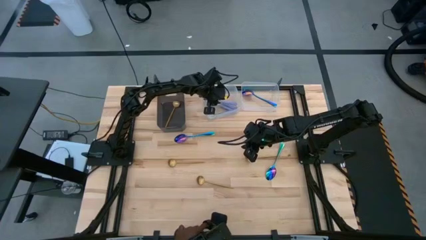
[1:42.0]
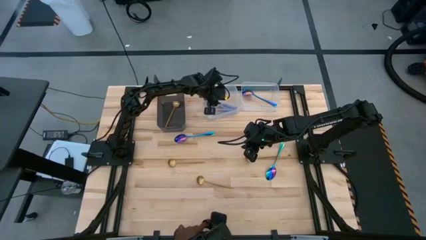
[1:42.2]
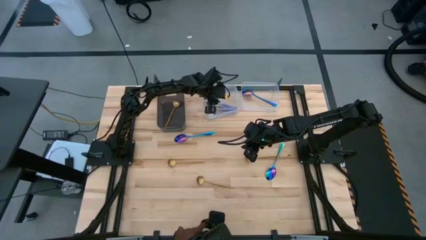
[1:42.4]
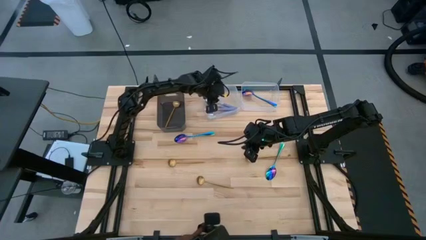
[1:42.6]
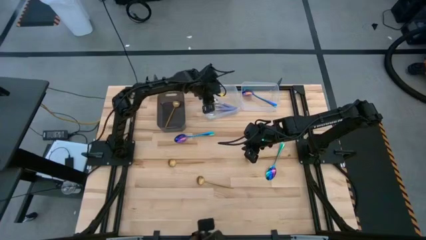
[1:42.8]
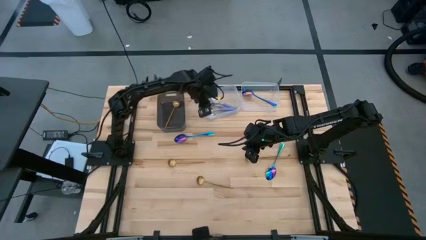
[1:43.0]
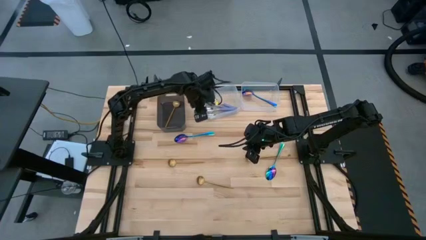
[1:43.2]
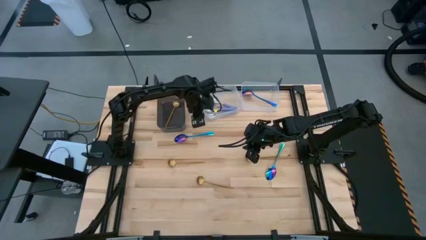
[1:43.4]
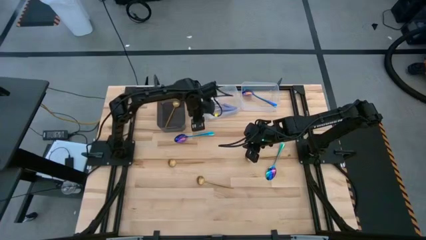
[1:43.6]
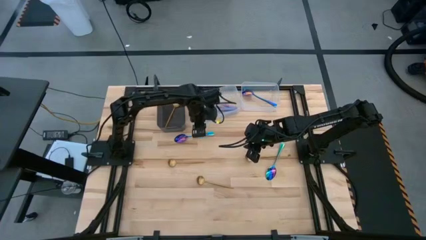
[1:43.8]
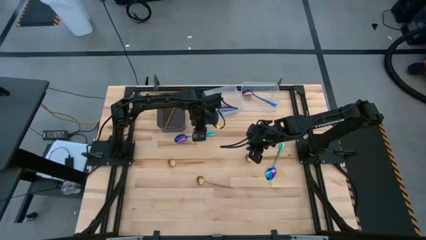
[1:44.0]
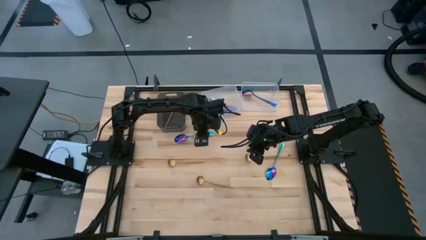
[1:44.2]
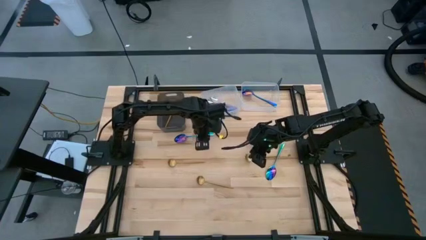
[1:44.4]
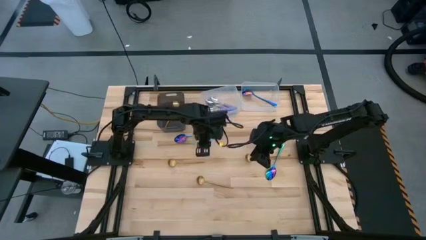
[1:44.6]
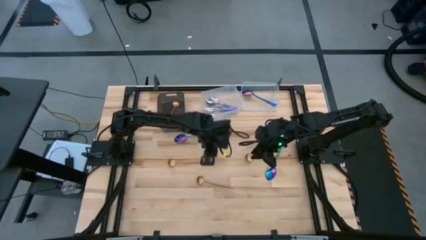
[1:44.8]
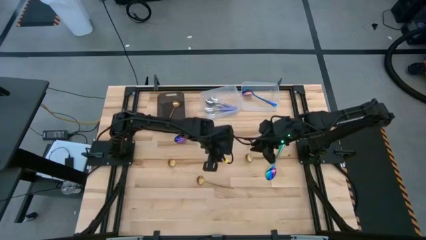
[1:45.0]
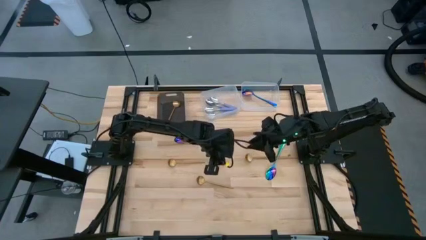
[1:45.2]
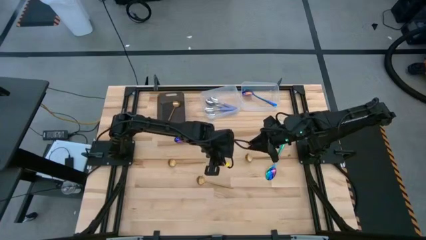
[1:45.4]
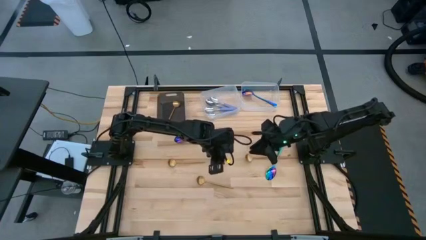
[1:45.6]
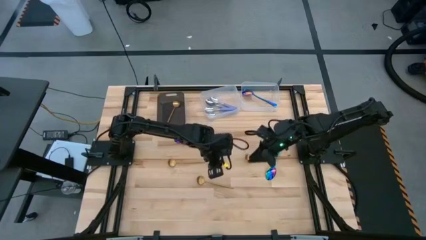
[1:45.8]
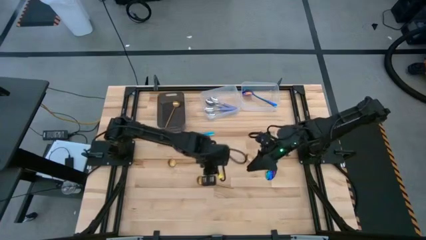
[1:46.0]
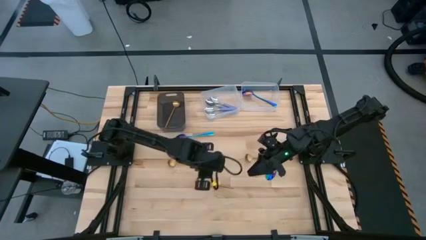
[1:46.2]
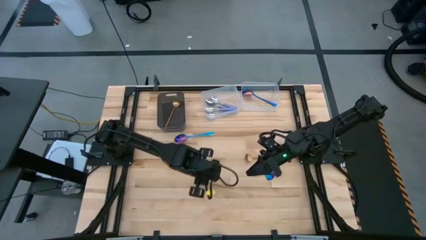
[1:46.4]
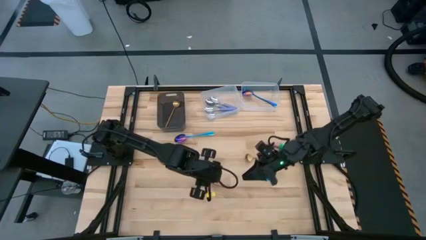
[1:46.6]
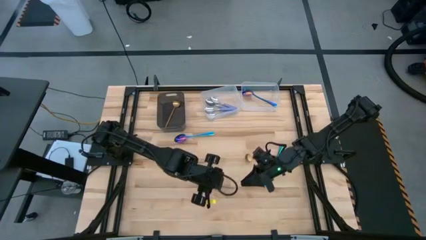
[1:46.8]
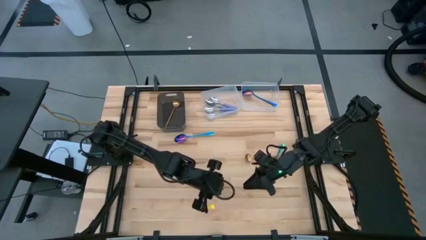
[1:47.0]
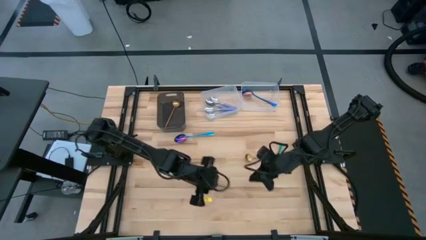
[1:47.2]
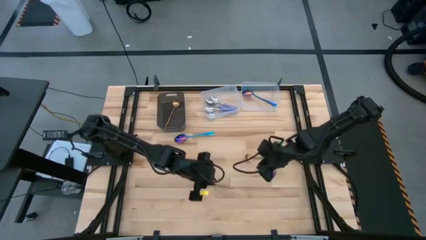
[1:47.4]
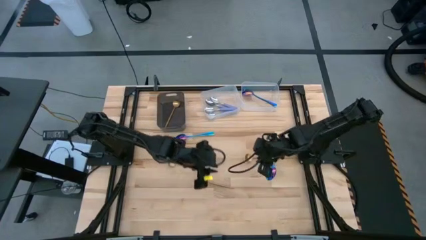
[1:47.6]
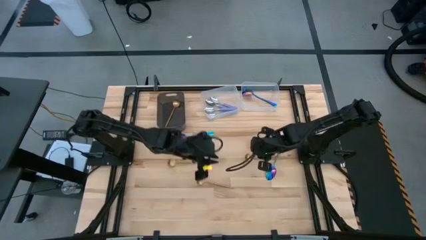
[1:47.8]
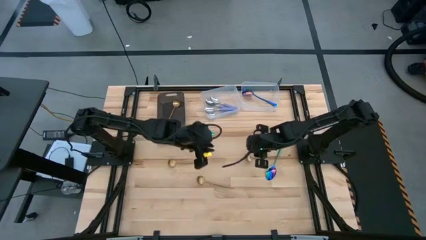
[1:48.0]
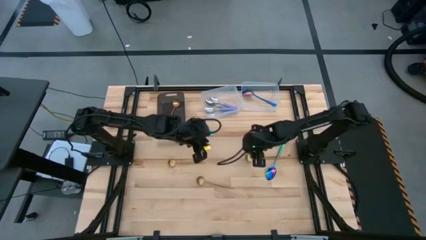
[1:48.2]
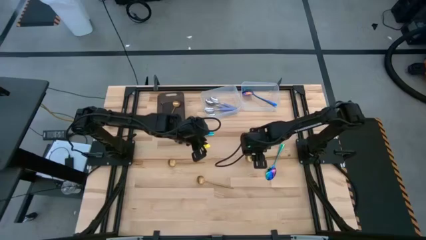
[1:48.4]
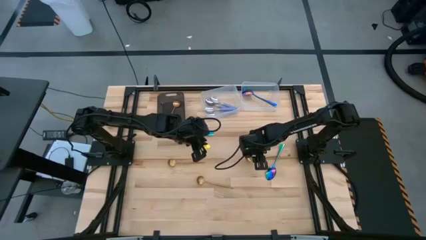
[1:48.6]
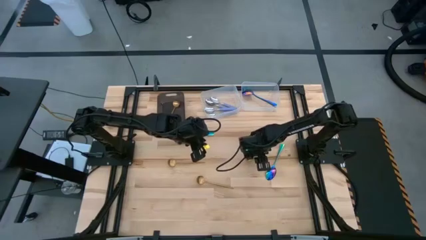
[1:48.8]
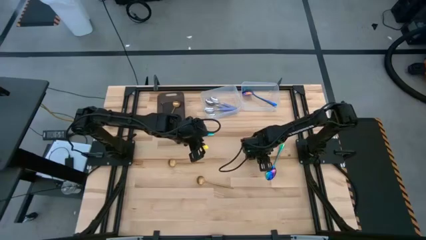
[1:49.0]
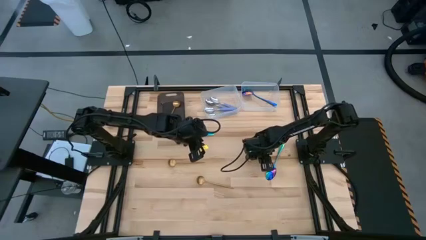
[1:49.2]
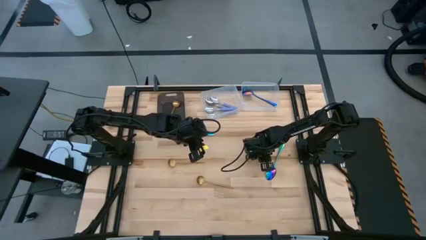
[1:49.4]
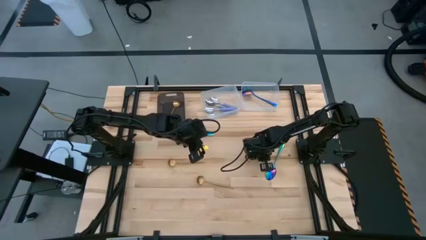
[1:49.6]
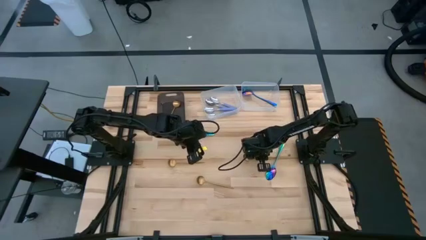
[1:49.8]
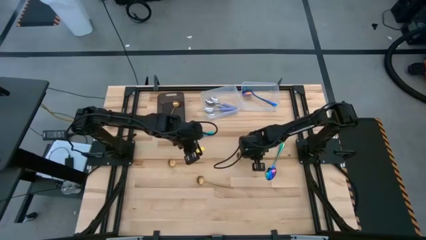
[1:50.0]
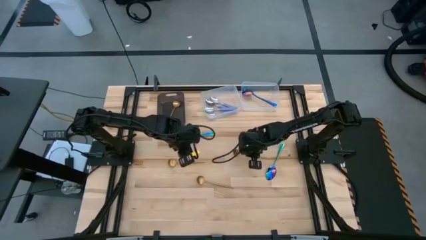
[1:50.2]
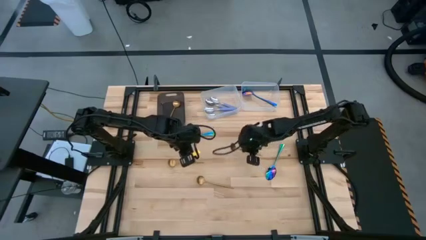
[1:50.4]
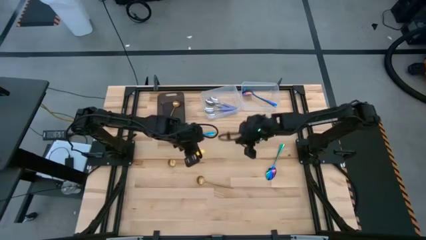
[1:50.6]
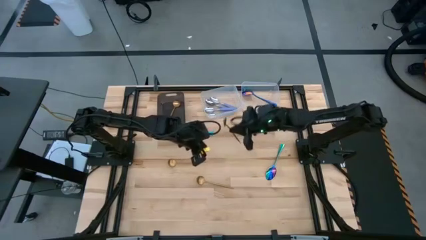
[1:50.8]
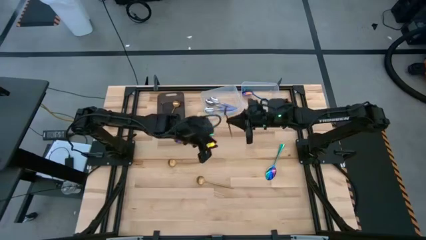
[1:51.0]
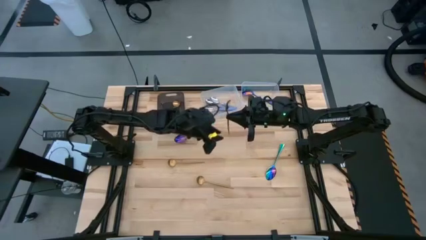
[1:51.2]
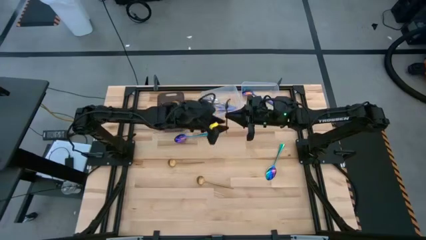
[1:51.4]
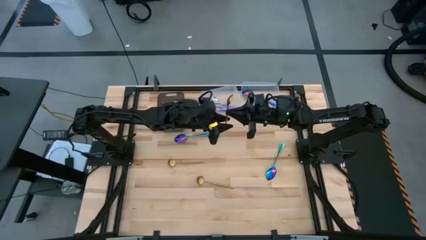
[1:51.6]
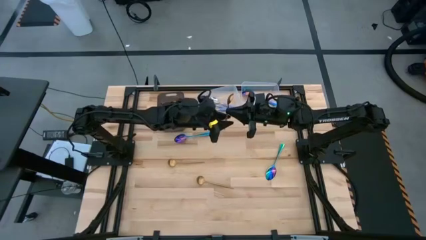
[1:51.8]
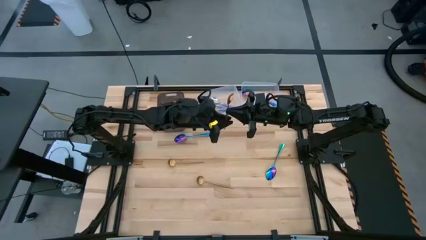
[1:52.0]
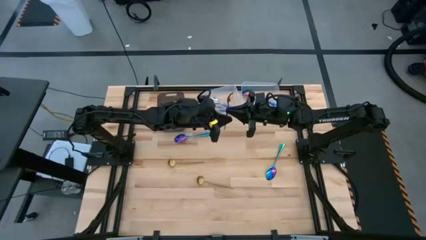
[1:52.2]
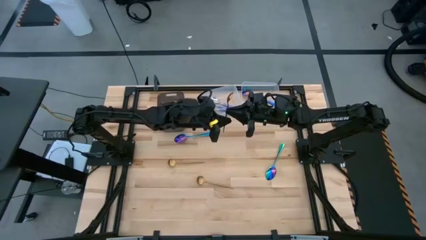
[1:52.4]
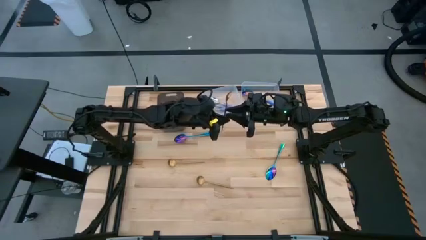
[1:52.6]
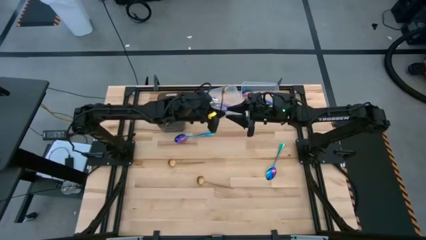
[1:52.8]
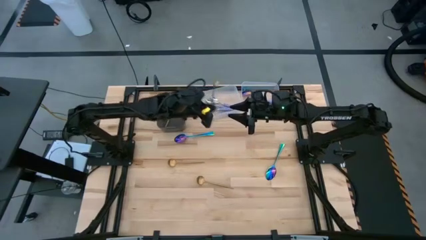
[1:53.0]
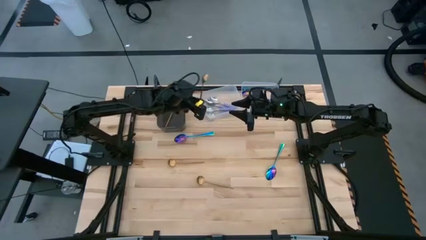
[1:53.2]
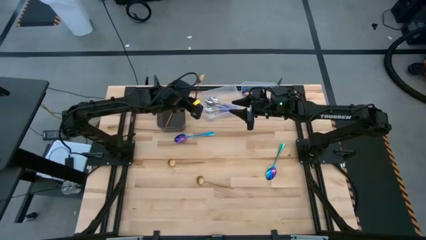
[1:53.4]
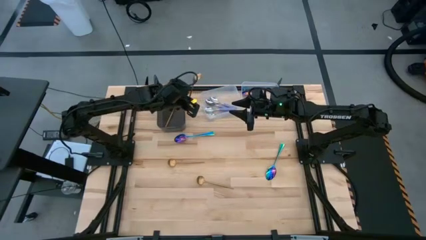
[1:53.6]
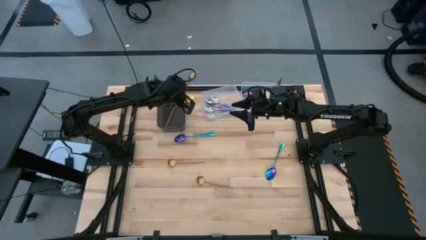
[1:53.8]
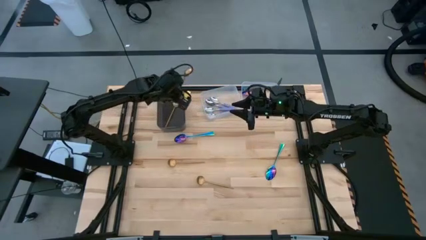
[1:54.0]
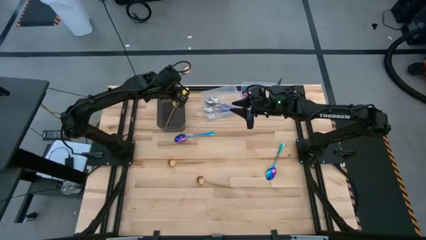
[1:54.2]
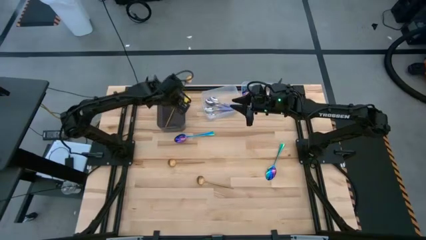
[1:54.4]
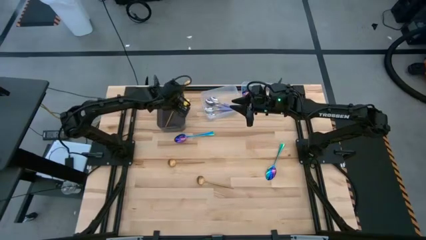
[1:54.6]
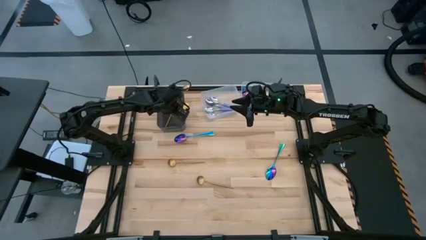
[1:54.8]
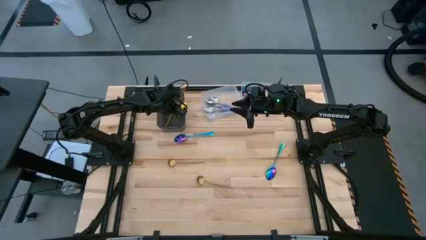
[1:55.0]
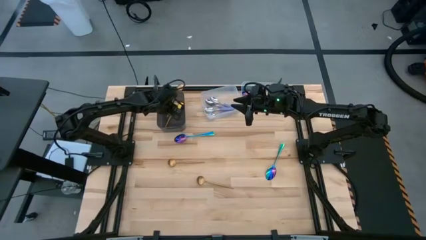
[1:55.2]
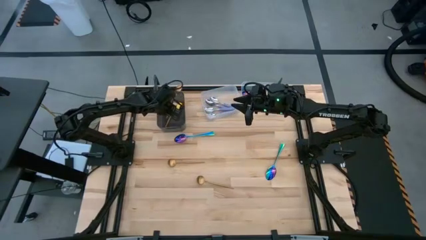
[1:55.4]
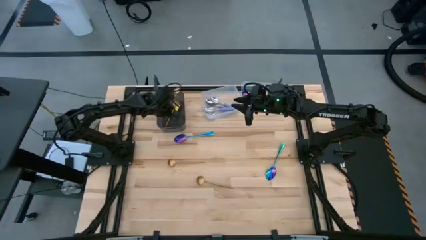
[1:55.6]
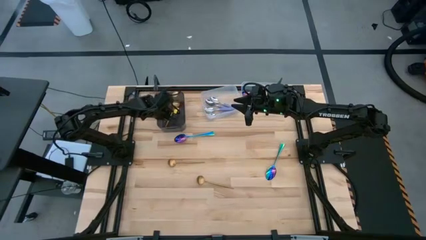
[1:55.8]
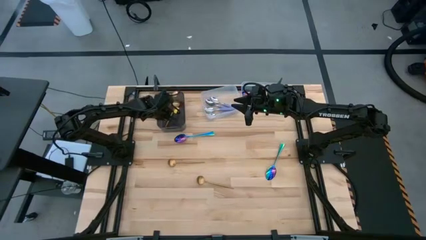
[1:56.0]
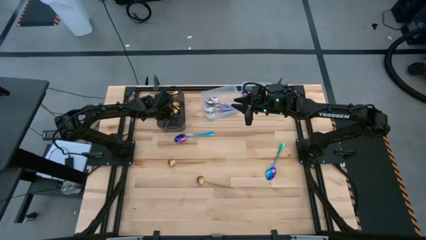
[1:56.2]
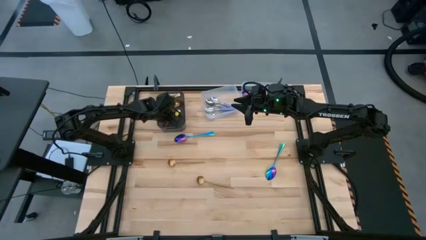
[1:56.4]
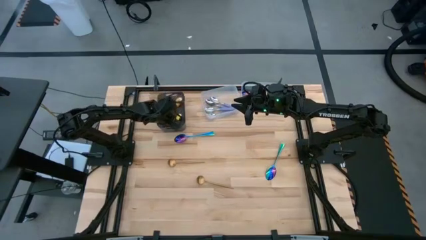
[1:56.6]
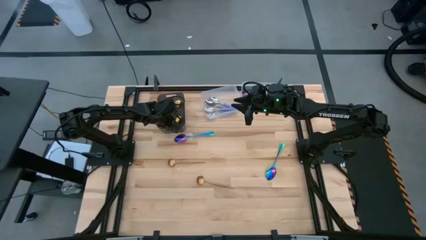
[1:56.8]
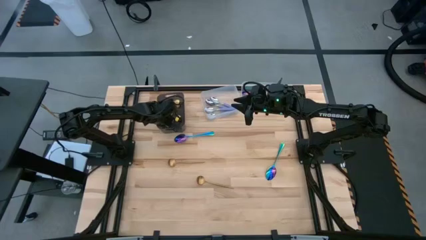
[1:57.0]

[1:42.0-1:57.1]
Task: Sort silverware by color (type)
Put the gold spoon into the black bin
